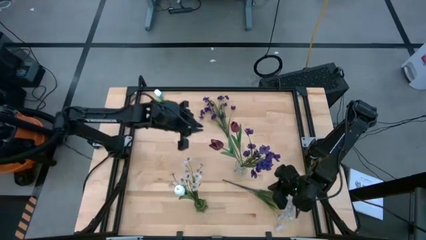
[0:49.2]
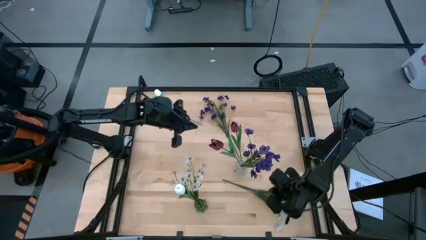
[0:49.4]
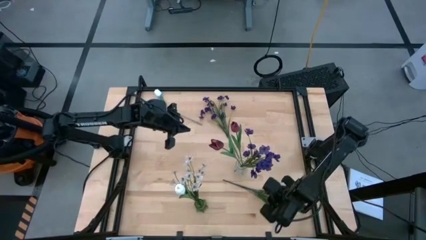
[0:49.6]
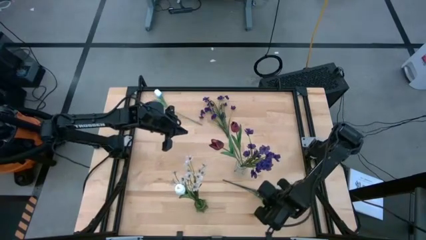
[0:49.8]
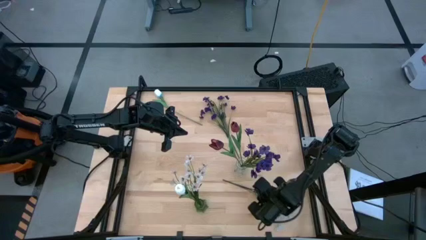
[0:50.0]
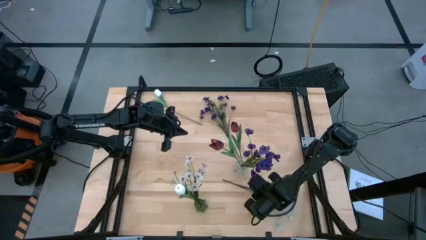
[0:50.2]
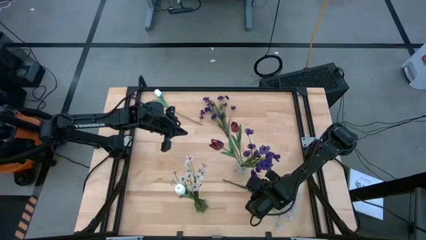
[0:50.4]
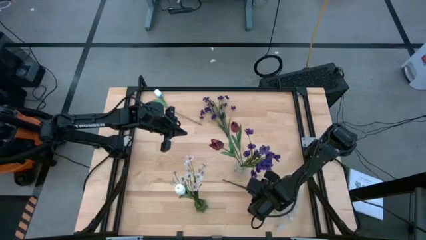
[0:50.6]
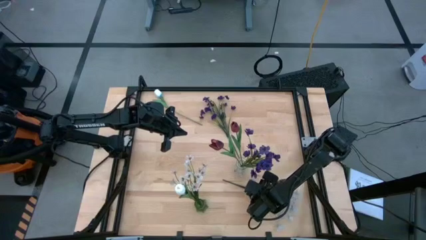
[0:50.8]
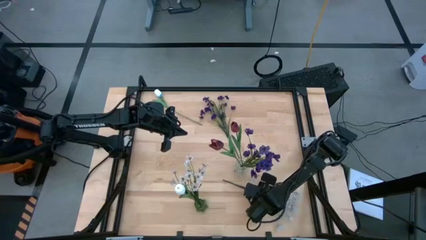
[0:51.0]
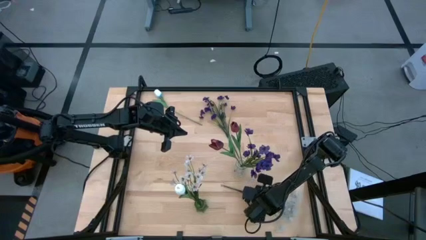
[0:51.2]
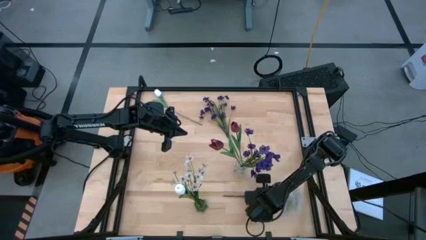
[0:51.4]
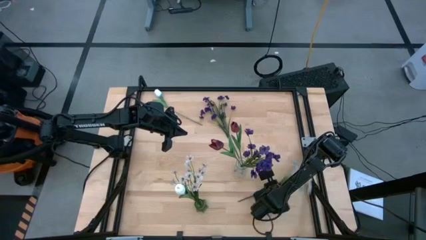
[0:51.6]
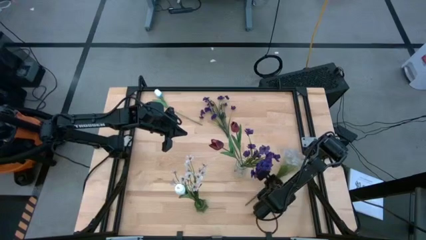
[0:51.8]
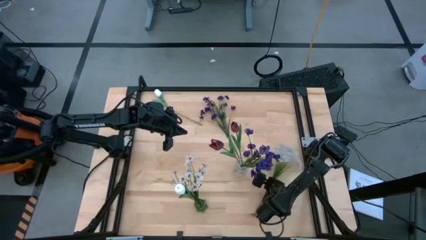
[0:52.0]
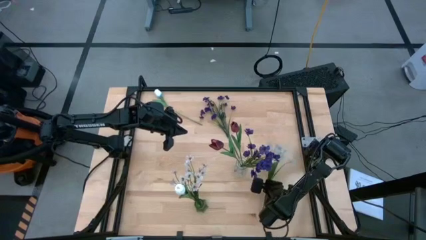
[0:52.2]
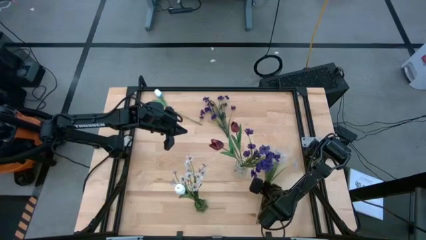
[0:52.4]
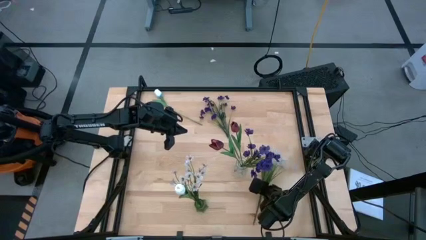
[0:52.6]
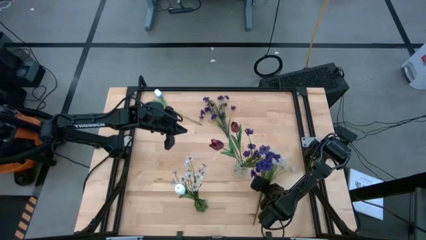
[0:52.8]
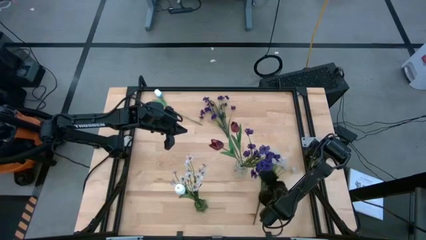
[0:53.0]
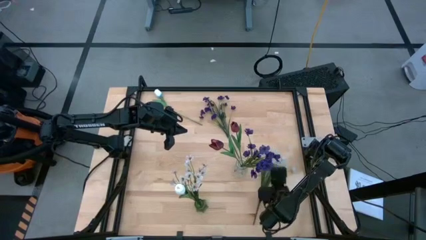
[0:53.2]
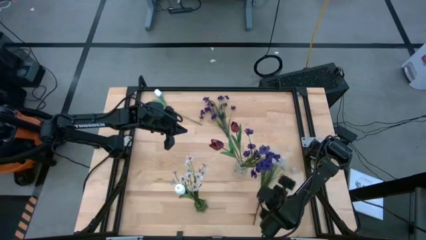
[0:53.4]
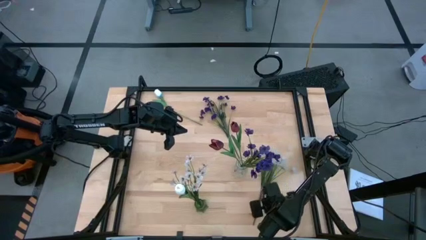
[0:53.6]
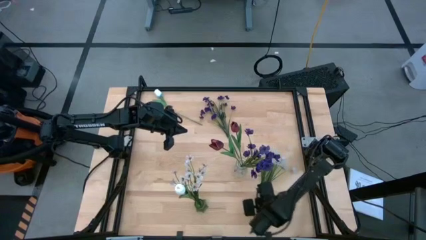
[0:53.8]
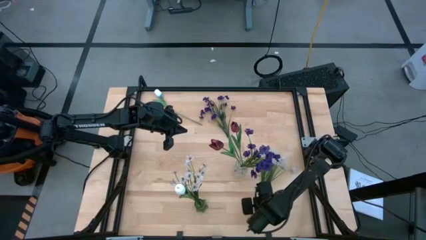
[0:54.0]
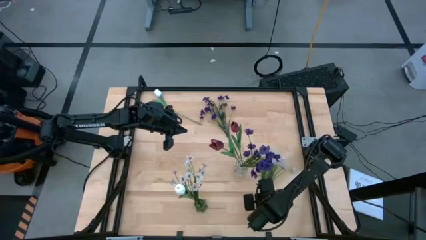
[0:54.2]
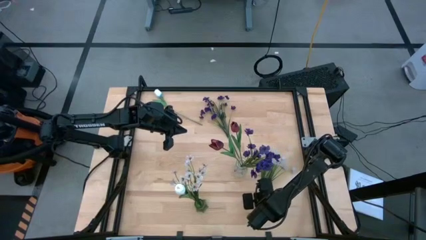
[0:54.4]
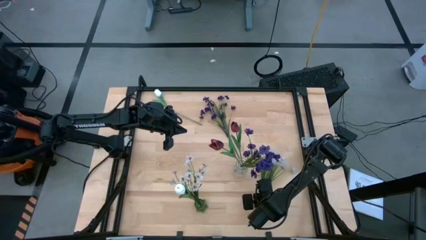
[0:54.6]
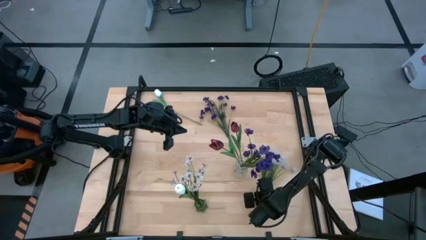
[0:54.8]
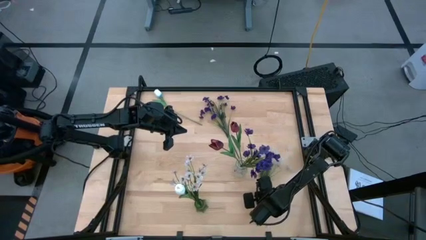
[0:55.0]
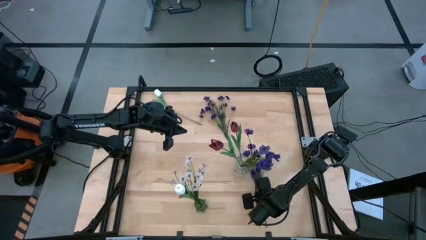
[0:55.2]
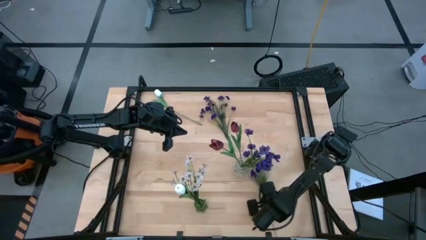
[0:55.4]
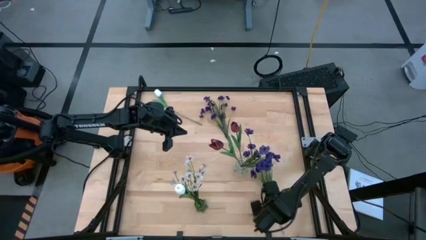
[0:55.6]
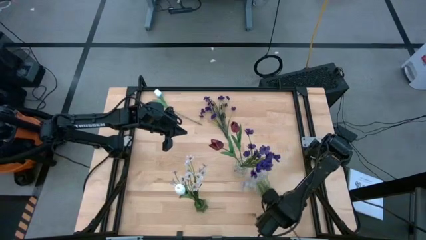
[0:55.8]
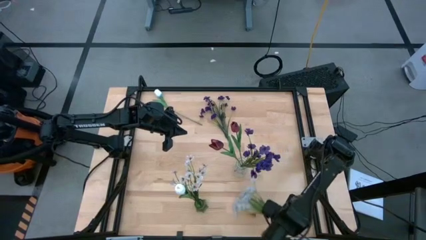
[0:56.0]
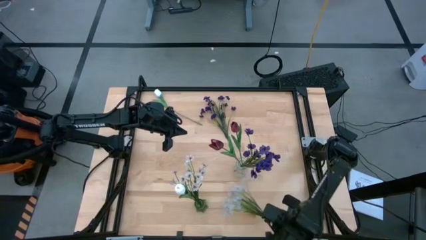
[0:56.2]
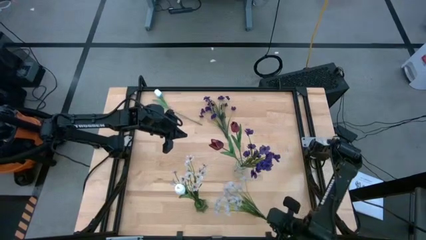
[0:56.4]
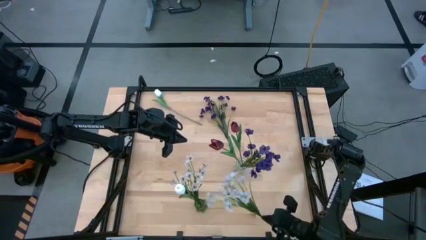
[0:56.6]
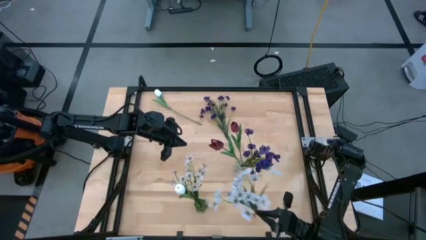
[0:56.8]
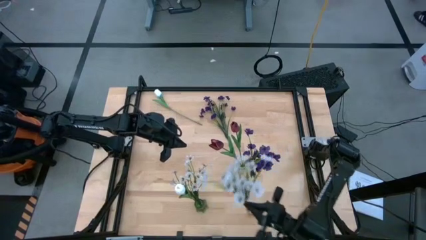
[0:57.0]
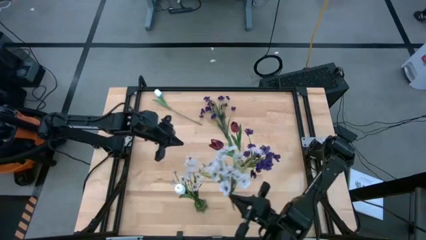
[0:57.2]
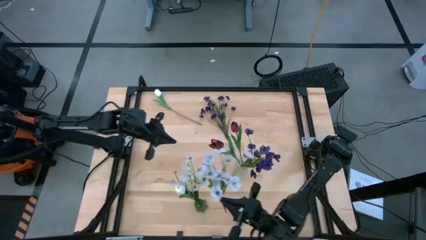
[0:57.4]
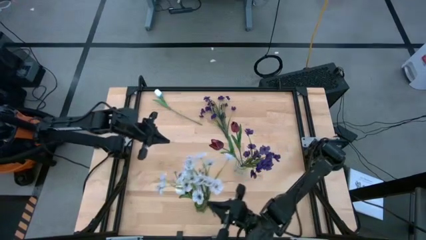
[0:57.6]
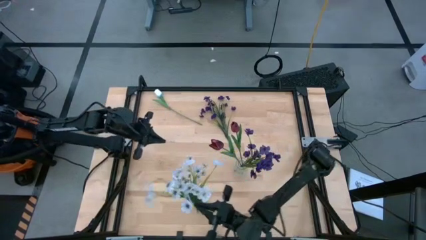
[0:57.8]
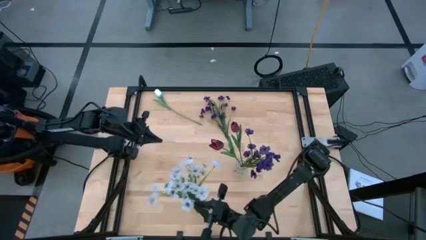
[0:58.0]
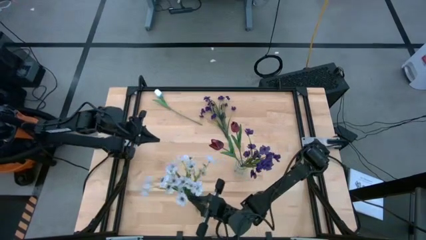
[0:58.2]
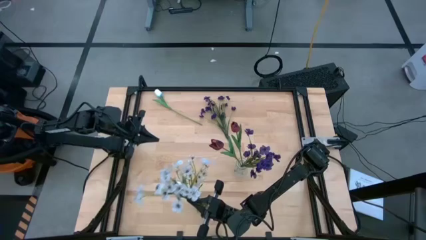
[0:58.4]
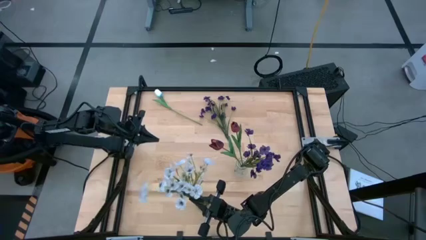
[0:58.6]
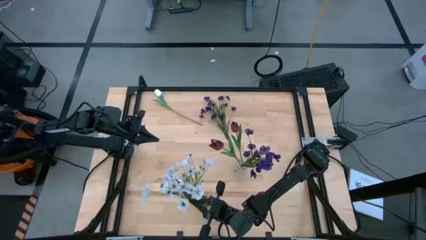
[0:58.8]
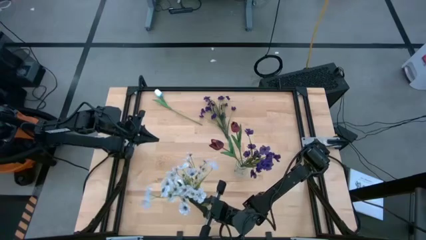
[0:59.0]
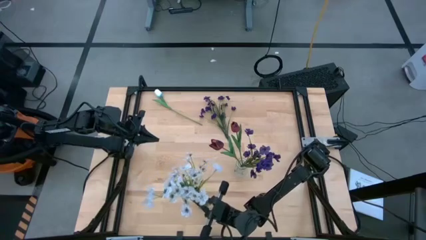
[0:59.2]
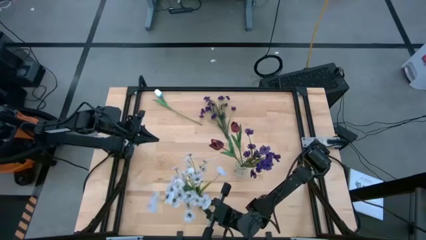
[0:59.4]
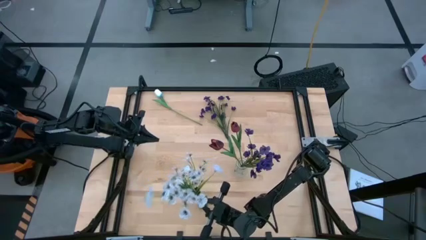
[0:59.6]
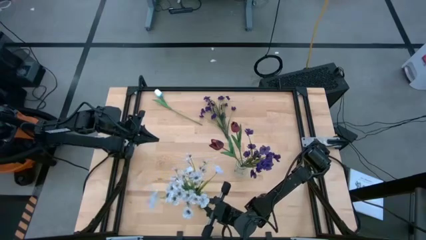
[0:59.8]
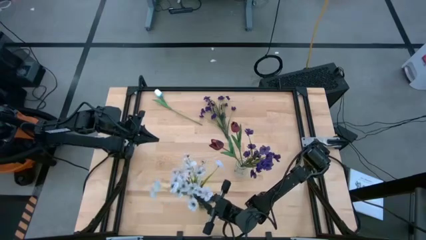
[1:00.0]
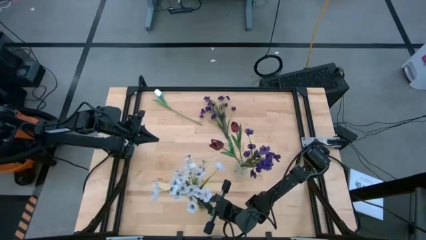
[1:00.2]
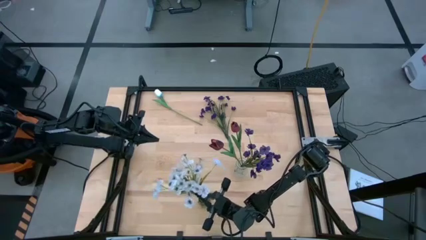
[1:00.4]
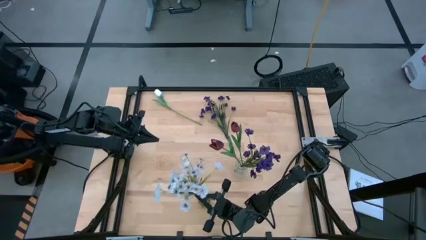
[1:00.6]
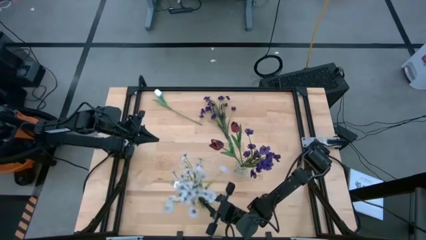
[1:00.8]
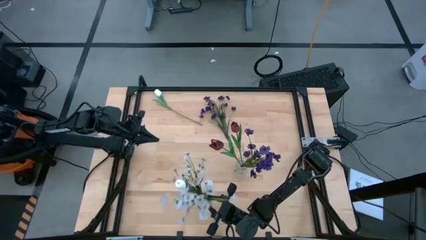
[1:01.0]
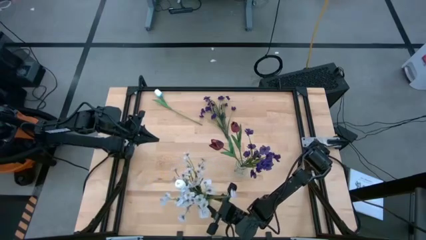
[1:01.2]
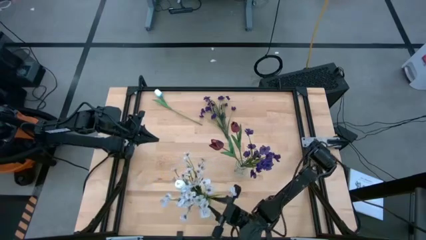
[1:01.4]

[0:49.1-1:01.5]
Task: Sort flowers into vase by color
Put the white flowers into the green vase
